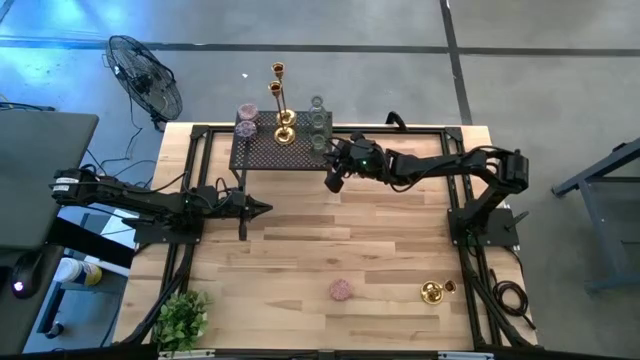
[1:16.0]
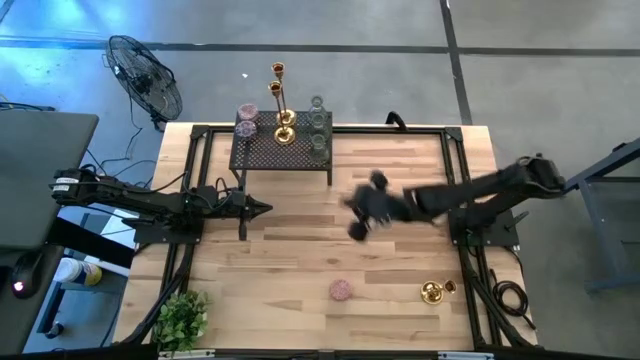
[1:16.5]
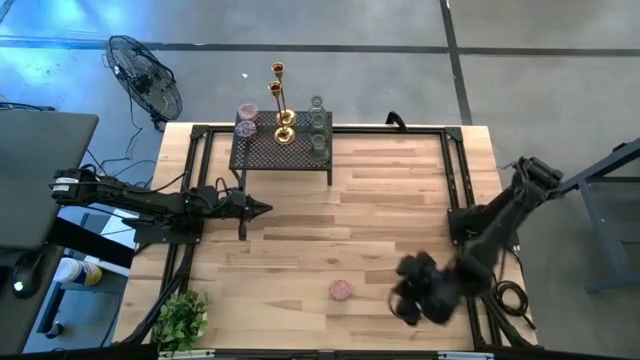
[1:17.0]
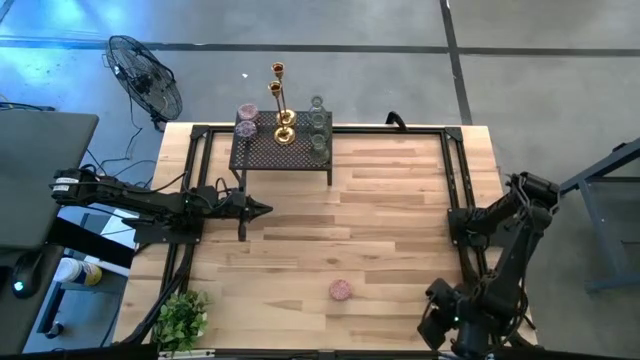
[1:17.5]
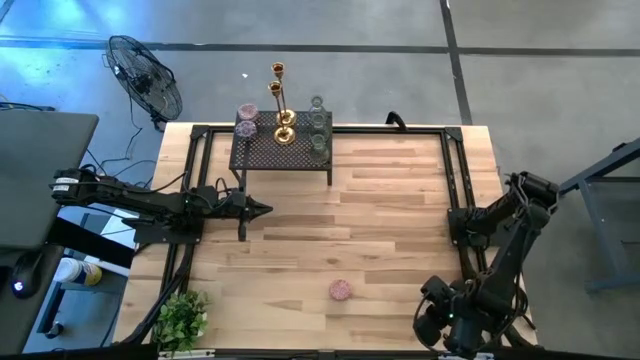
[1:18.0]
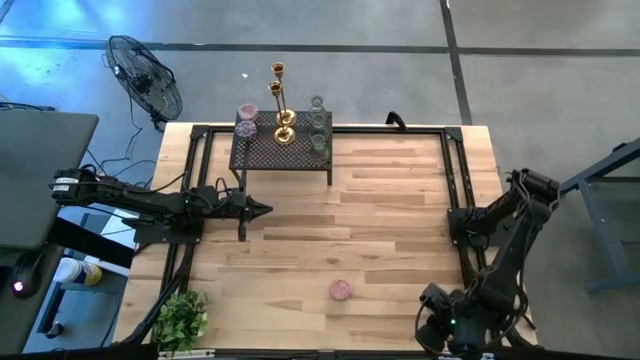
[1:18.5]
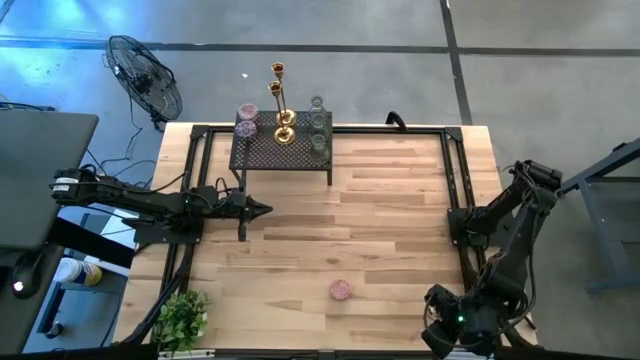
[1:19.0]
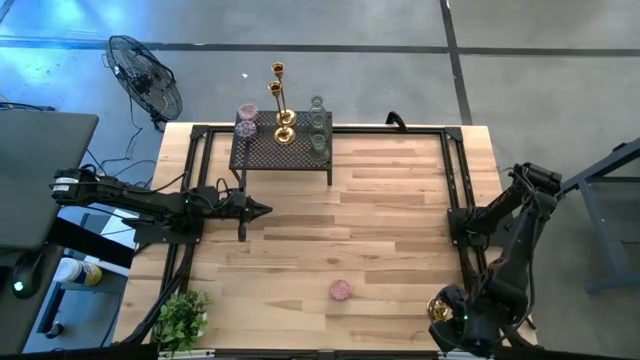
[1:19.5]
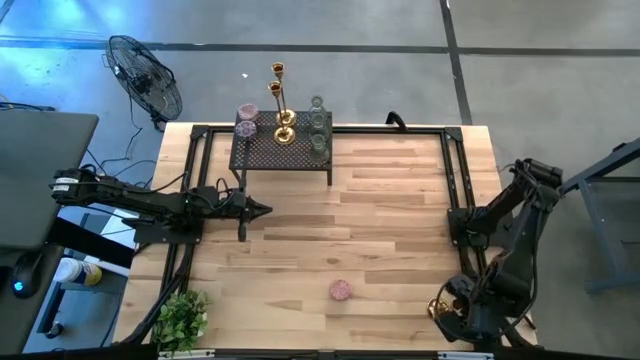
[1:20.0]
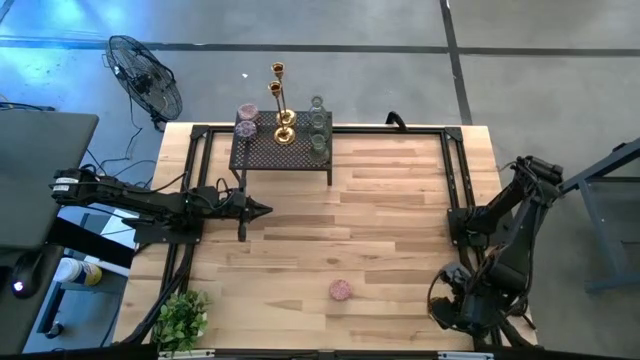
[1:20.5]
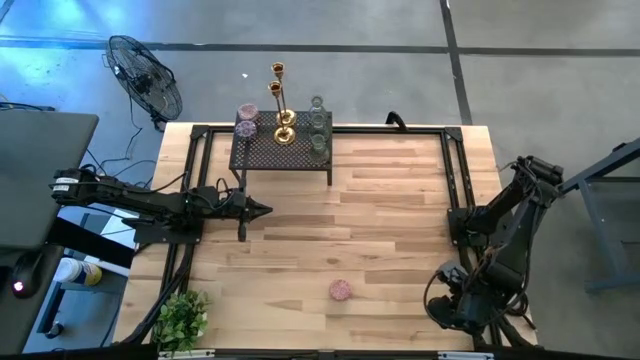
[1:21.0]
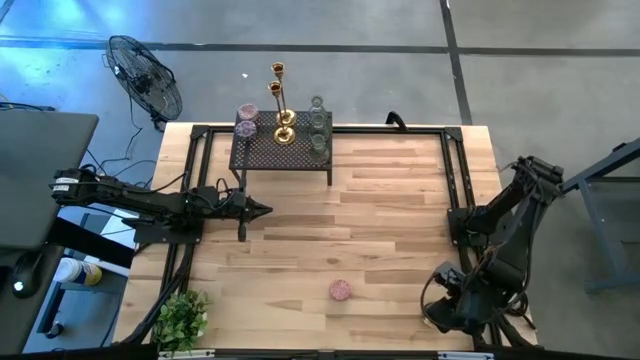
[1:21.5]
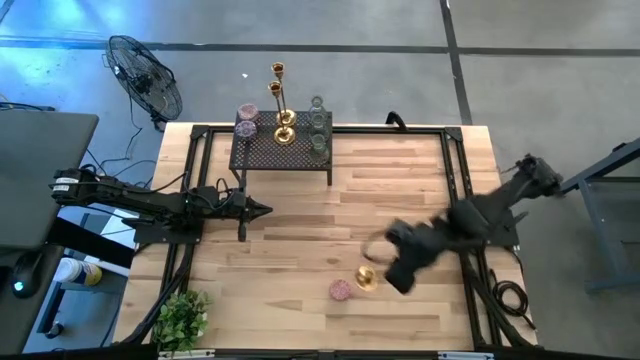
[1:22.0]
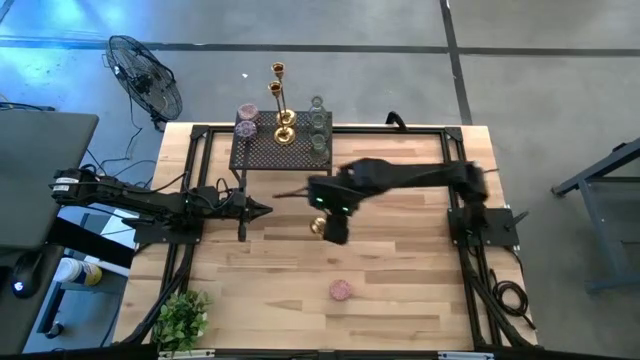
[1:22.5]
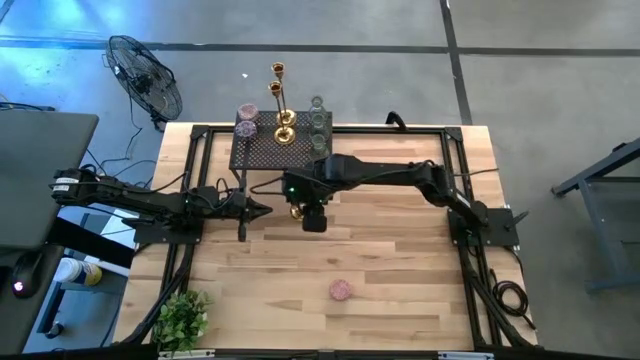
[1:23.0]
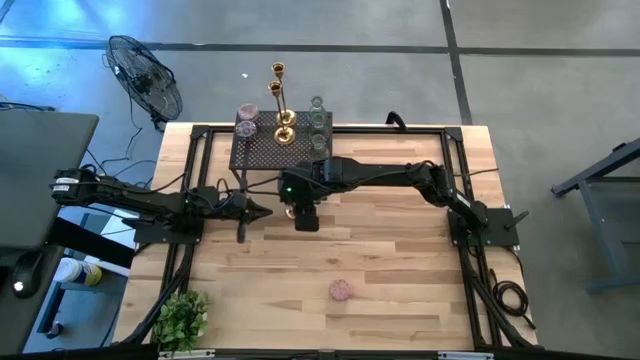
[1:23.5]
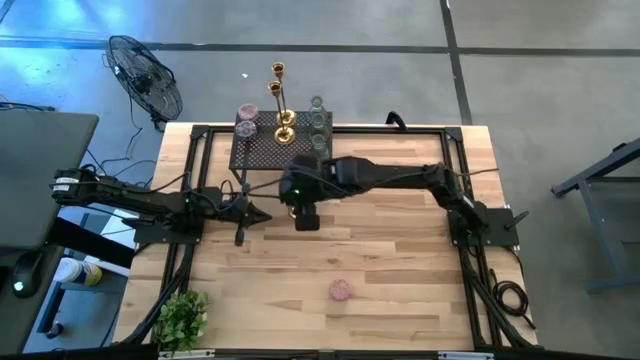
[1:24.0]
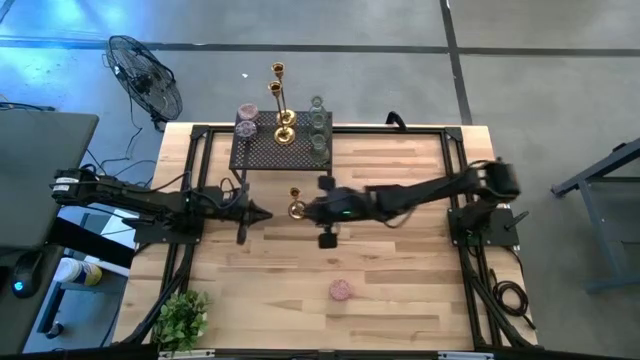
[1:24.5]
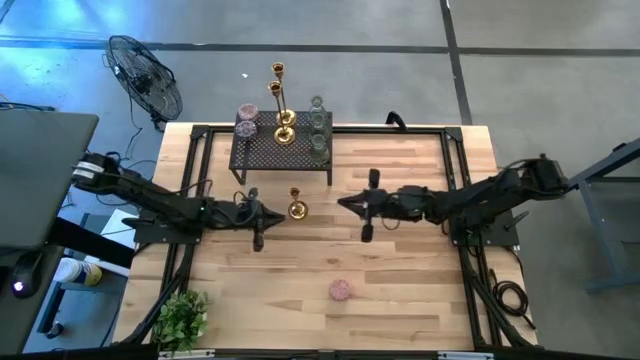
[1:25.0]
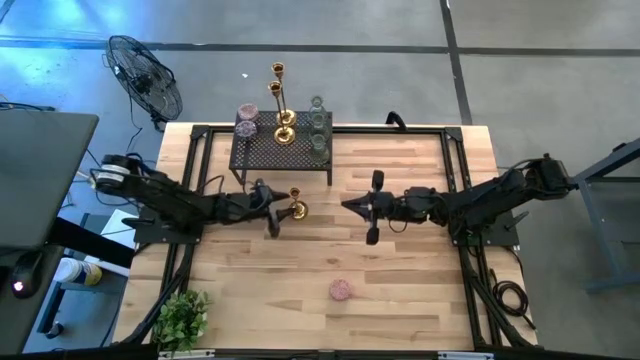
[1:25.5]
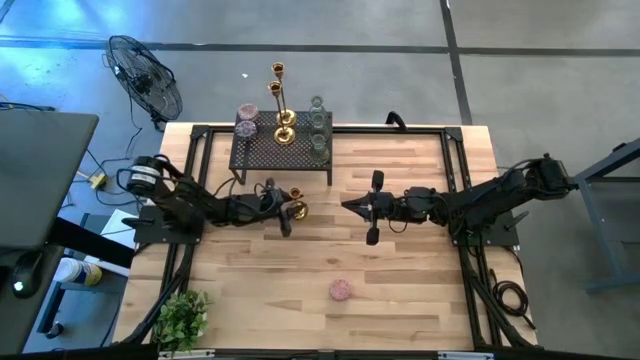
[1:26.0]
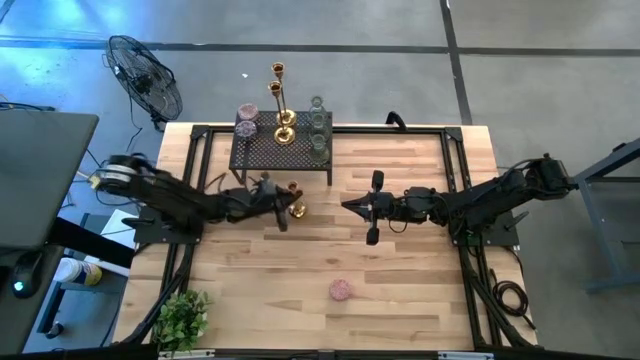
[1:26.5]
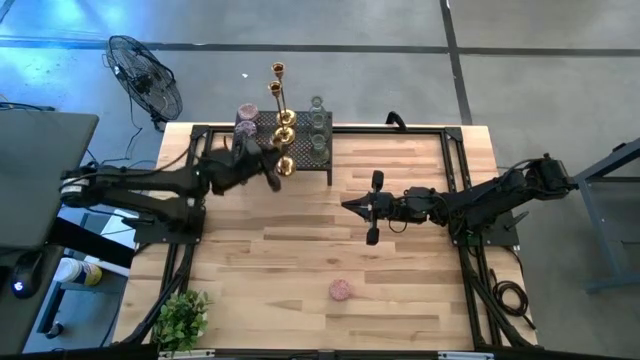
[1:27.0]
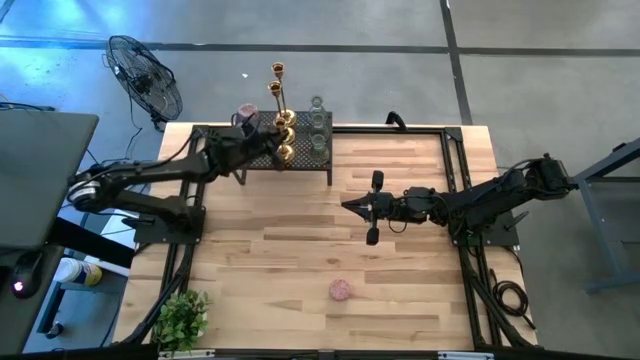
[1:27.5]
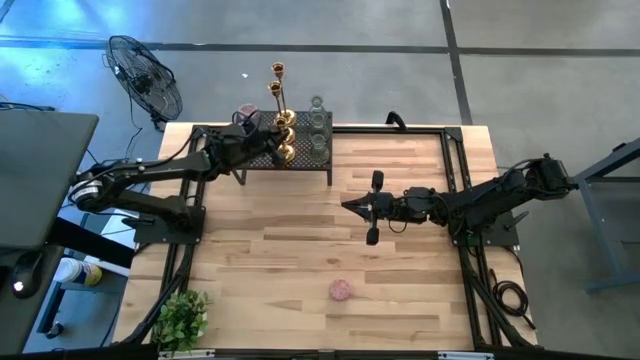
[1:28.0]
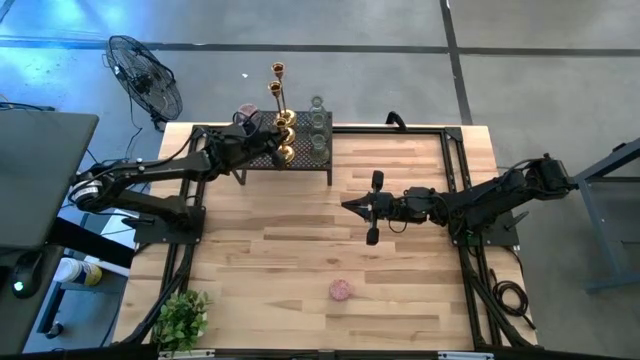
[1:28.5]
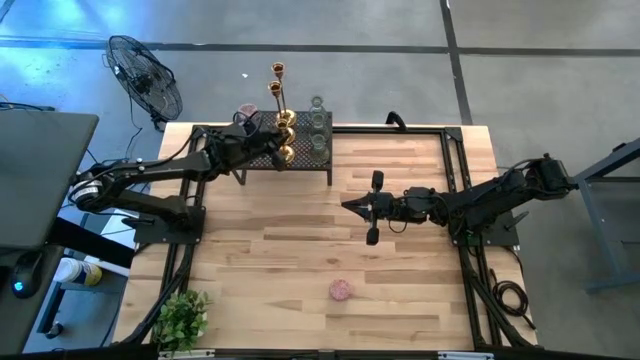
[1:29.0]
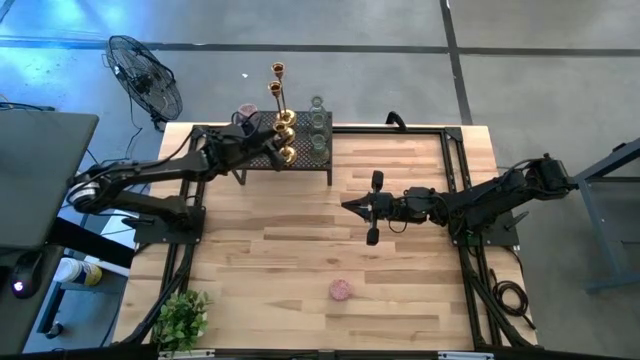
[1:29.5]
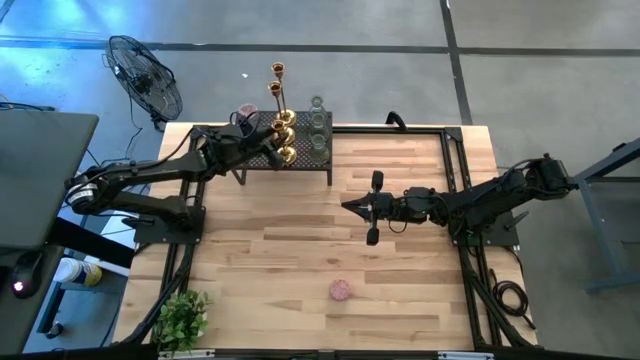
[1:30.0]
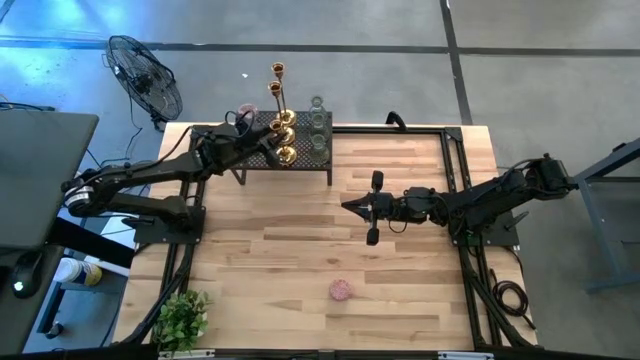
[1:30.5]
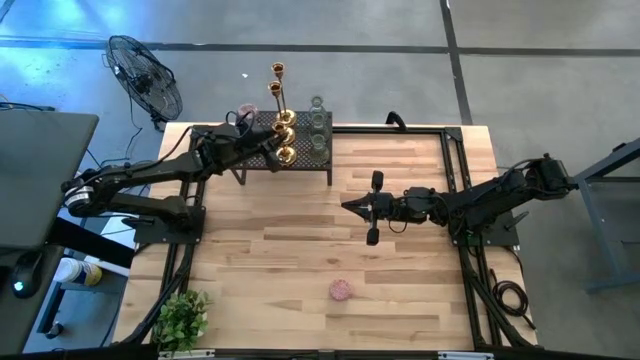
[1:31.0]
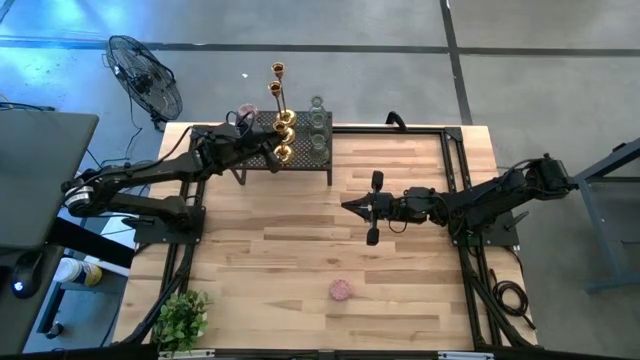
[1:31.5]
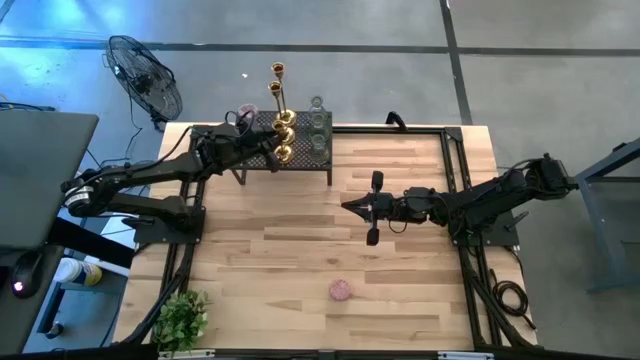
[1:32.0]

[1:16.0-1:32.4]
Task: Pick & Place candle stick holders
Put the gold candle holder on the shelf aligned with the other gold candle holders

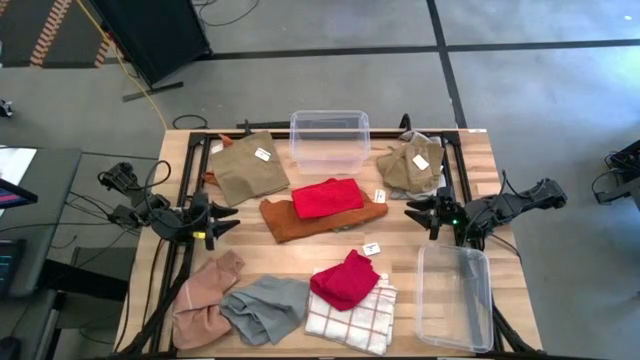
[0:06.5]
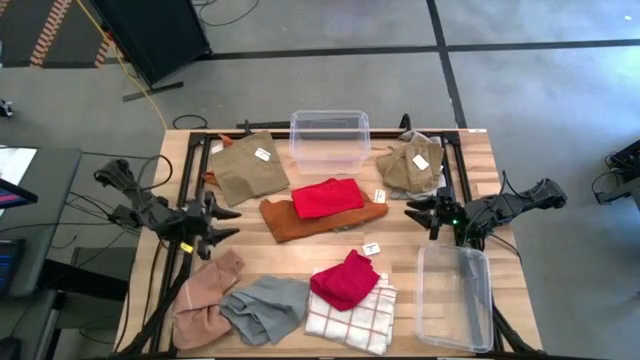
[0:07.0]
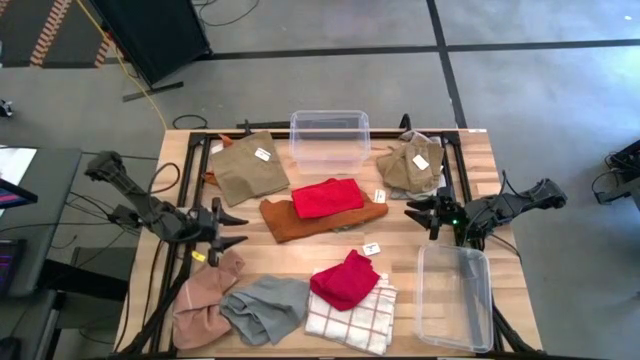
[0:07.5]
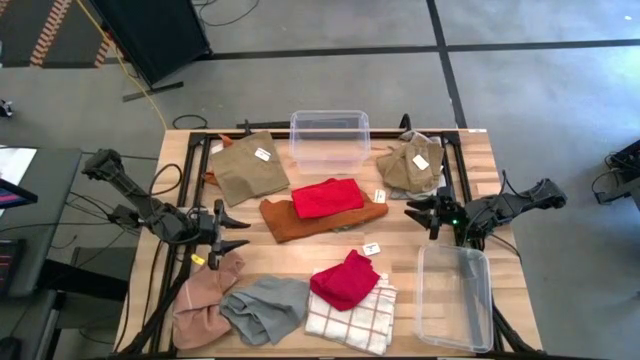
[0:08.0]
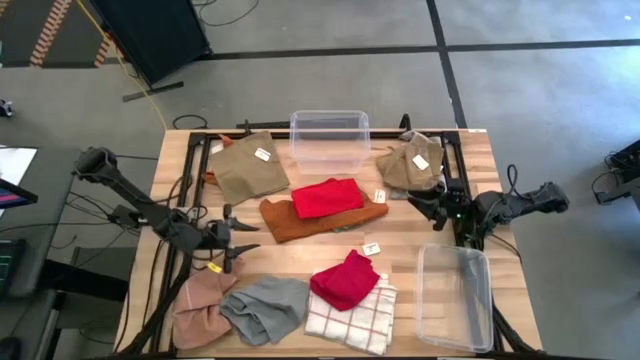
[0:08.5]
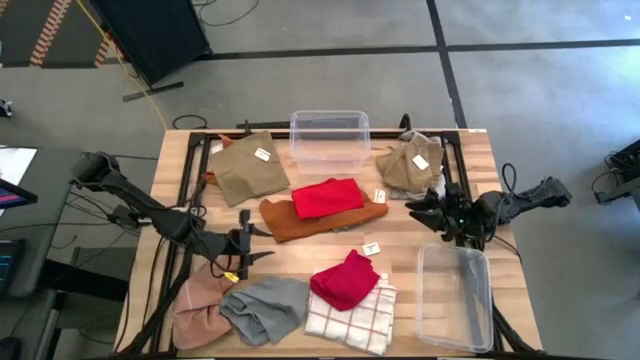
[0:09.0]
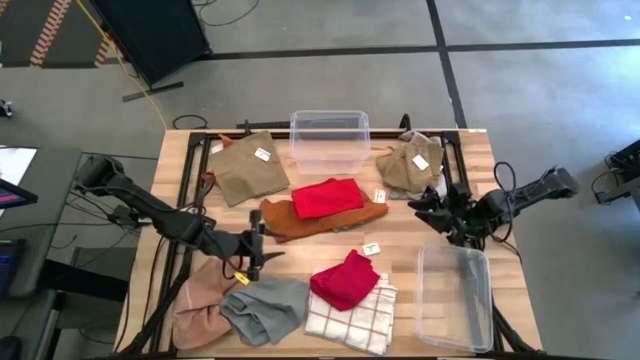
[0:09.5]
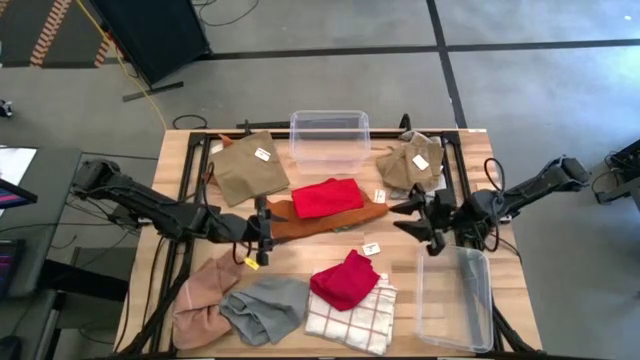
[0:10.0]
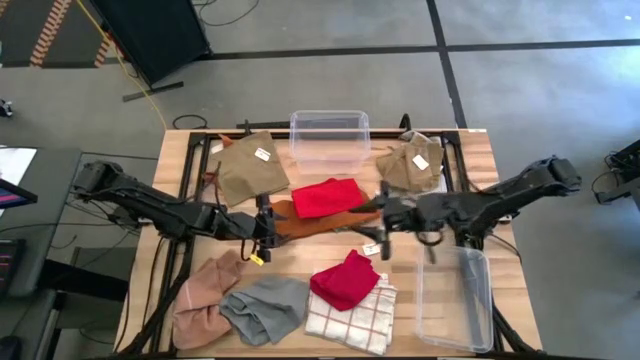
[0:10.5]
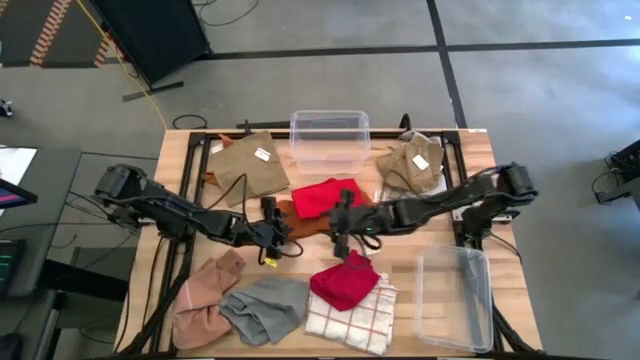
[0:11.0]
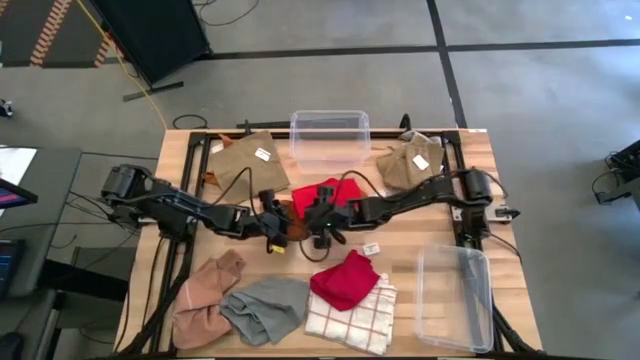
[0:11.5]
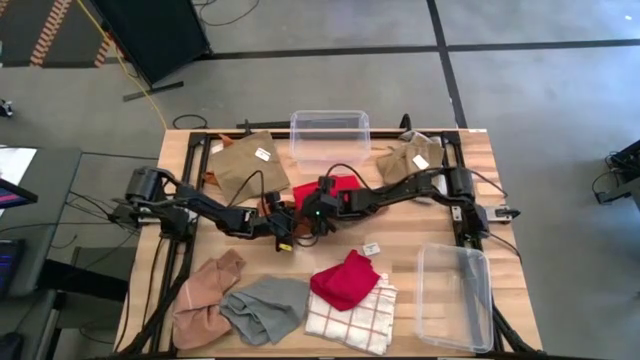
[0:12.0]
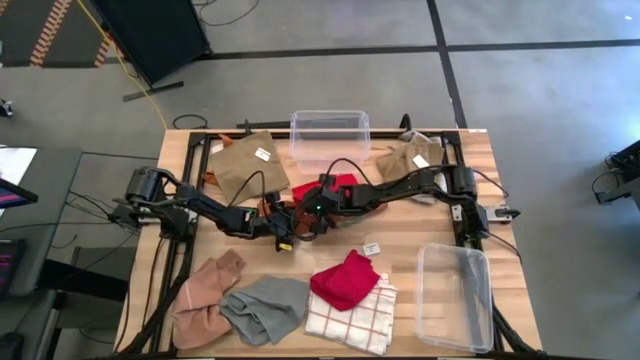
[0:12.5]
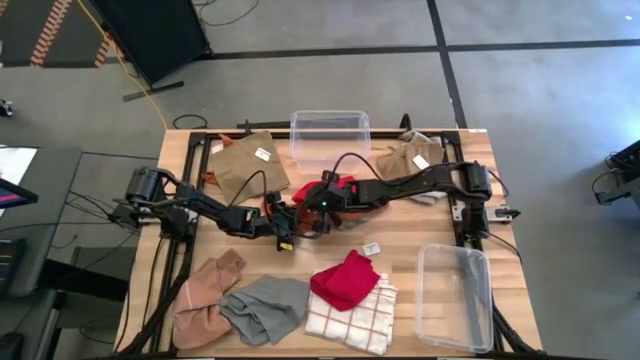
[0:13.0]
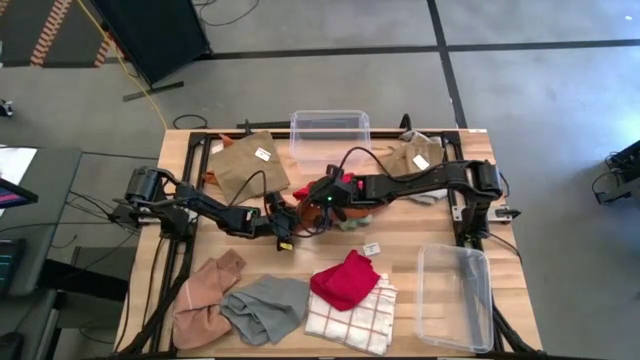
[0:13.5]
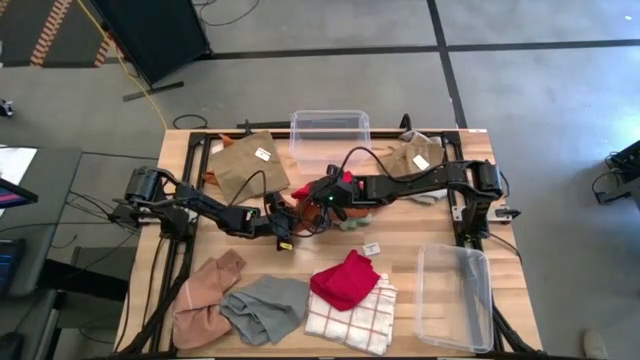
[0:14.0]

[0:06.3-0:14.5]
Task: Sort towels by color in basket
Put the top red towel into the bottom transparent bin
